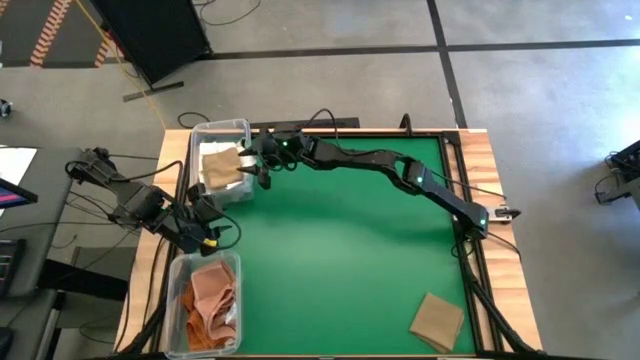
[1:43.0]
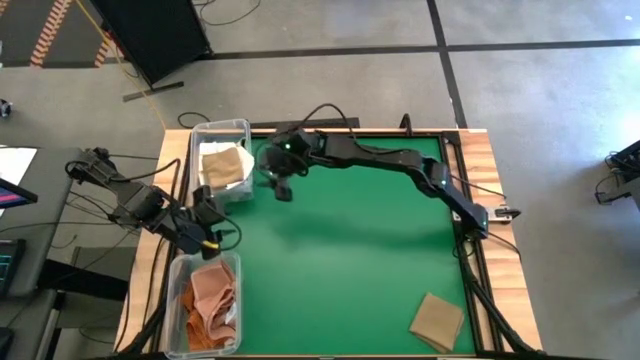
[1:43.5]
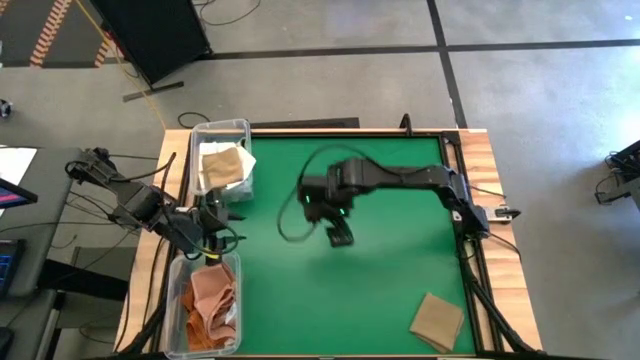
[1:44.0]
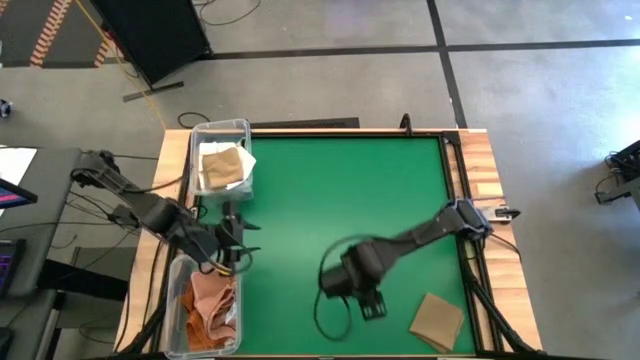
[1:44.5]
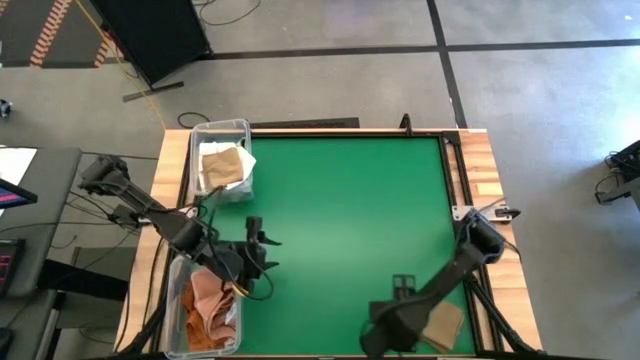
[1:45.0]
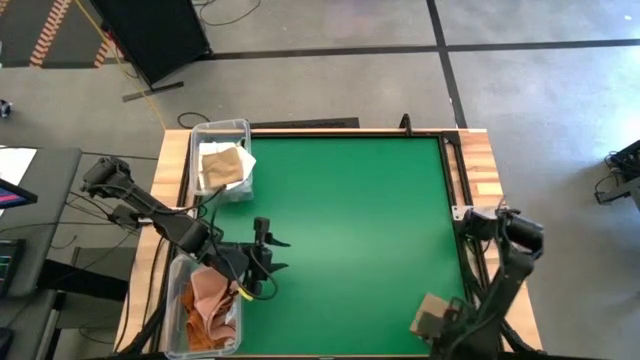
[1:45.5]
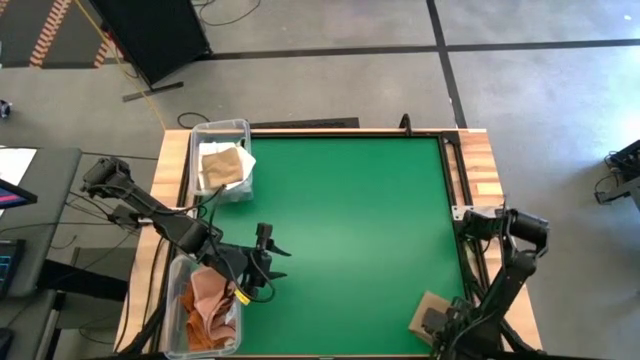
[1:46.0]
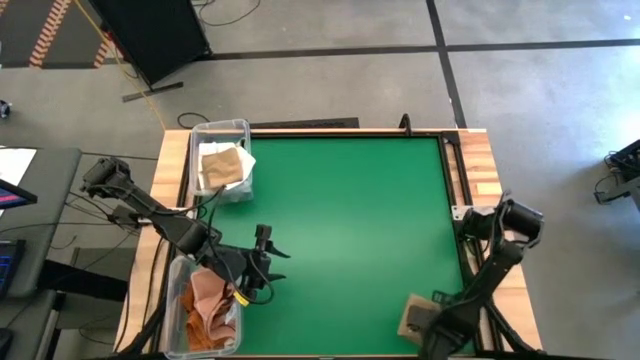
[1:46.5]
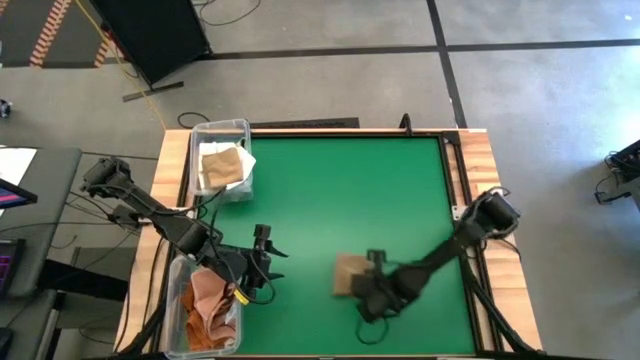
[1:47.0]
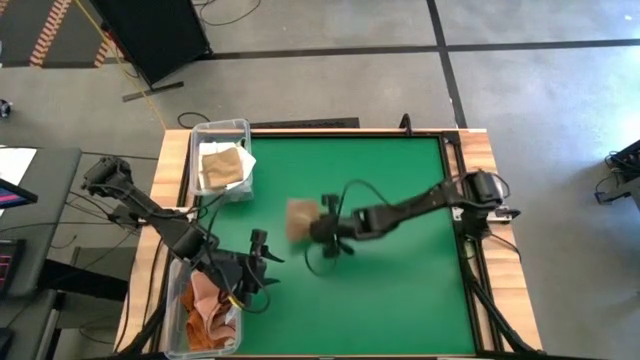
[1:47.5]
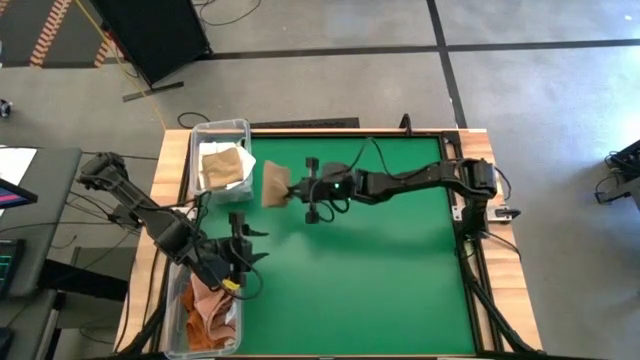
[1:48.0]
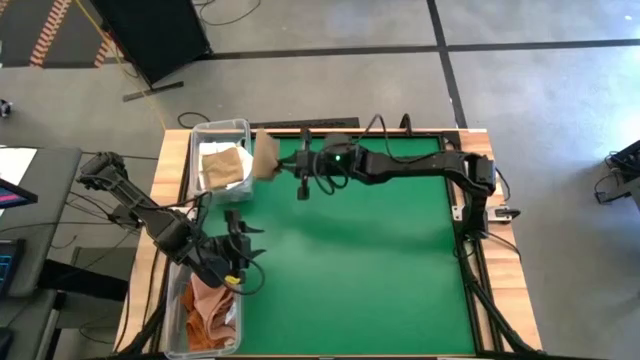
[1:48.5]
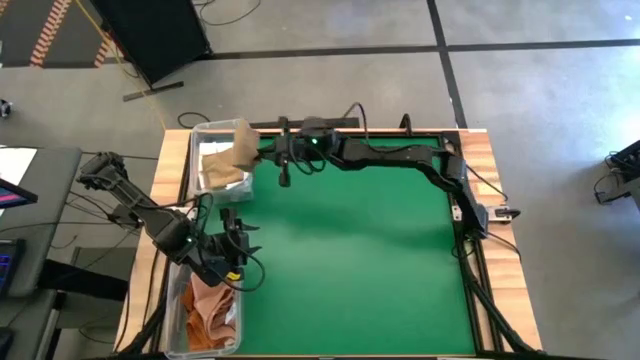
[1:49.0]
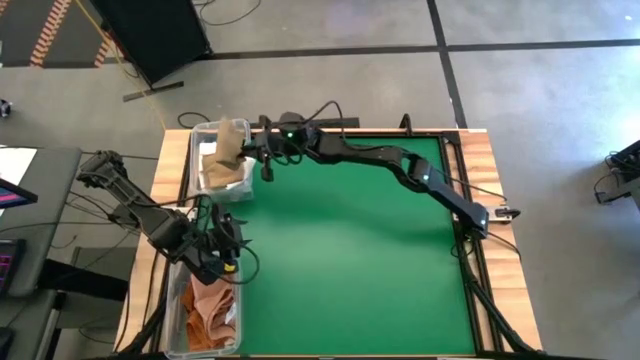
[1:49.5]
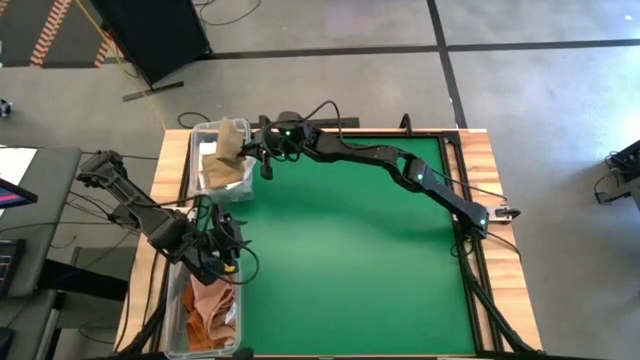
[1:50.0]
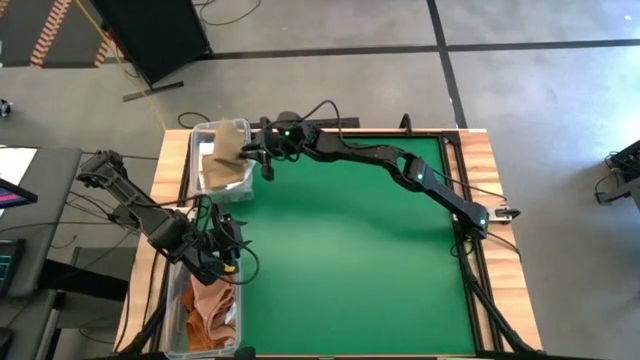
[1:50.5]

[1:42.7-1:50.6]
Task: Sort towels by color in basket
Put the brown towel into the top left transparent bin

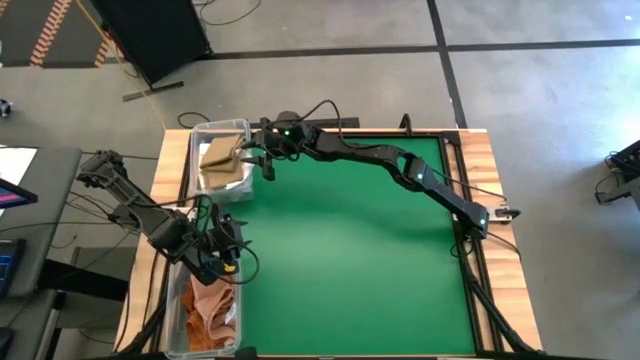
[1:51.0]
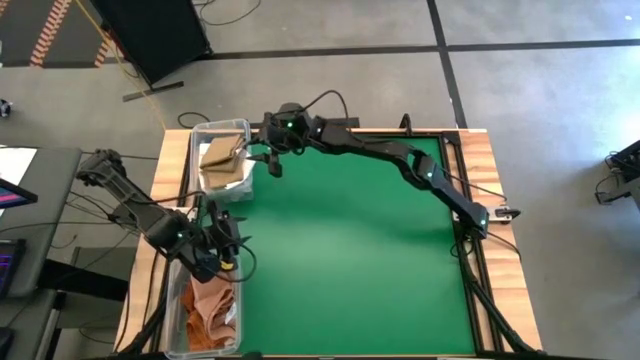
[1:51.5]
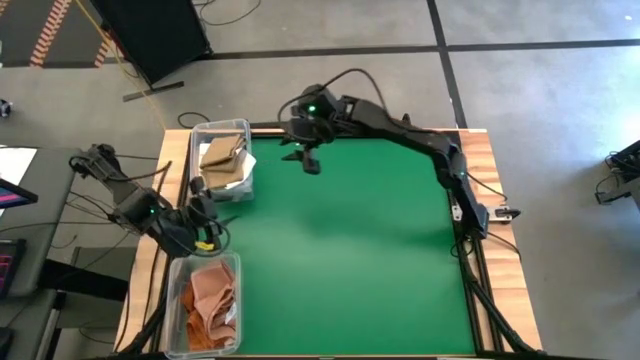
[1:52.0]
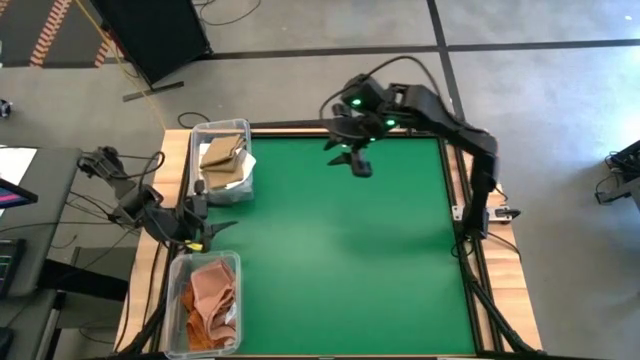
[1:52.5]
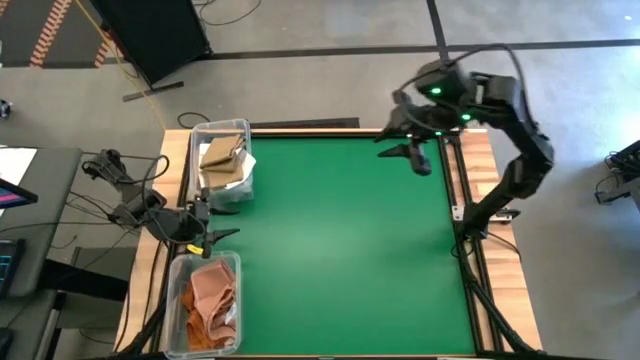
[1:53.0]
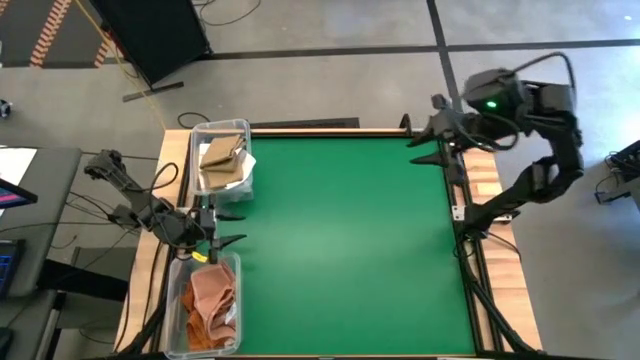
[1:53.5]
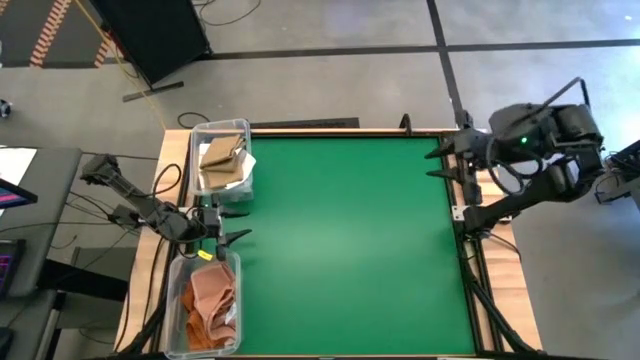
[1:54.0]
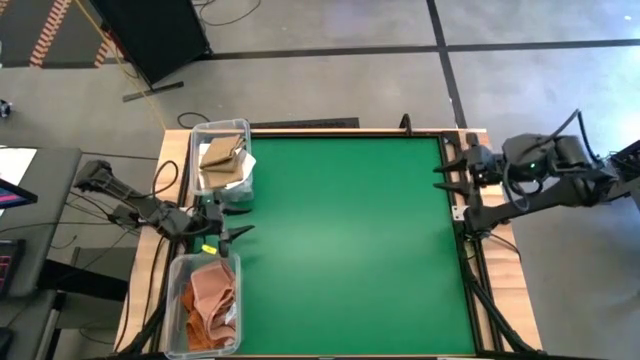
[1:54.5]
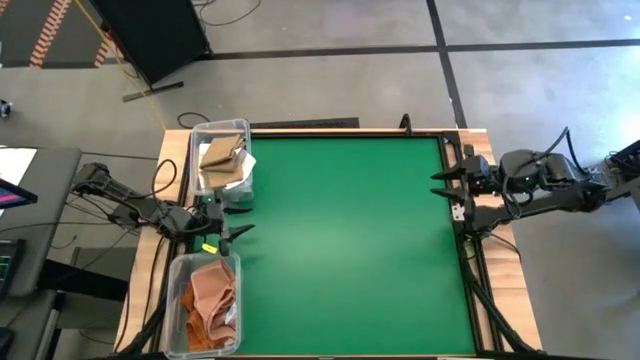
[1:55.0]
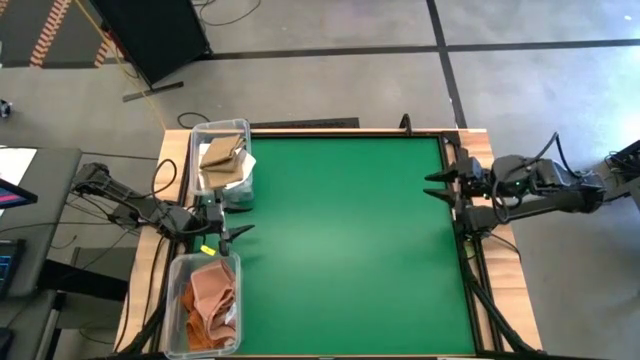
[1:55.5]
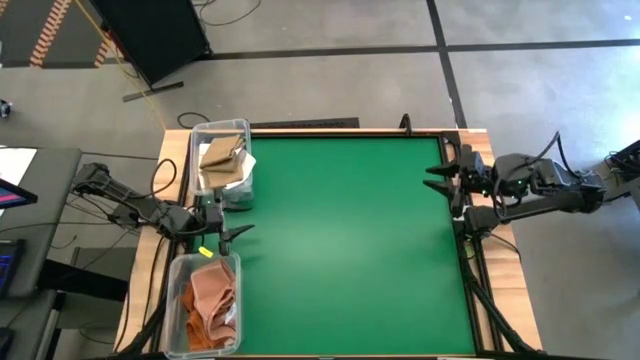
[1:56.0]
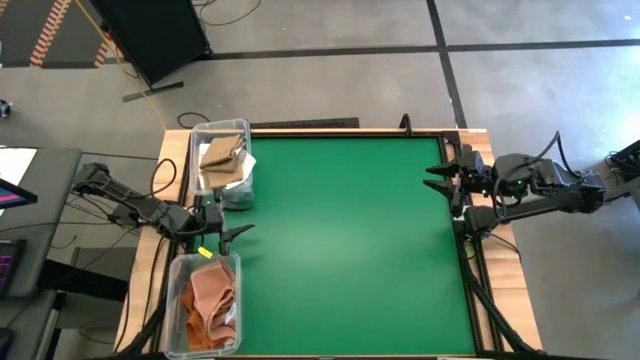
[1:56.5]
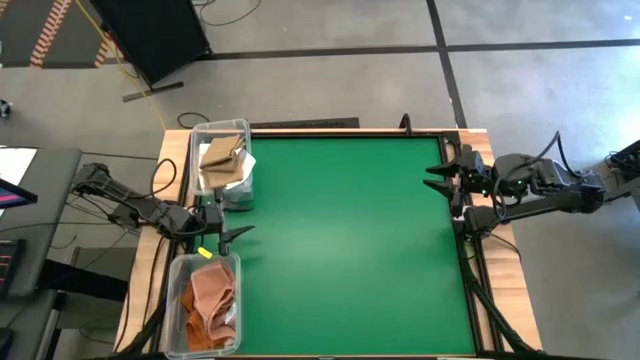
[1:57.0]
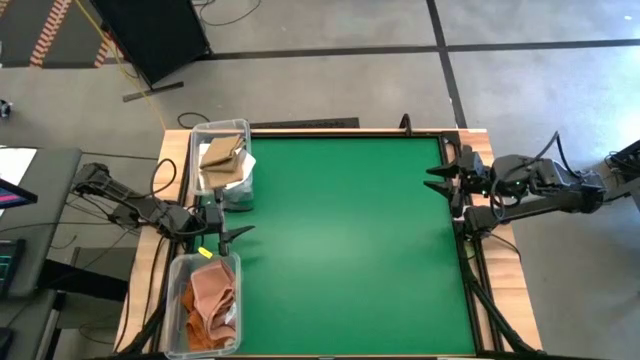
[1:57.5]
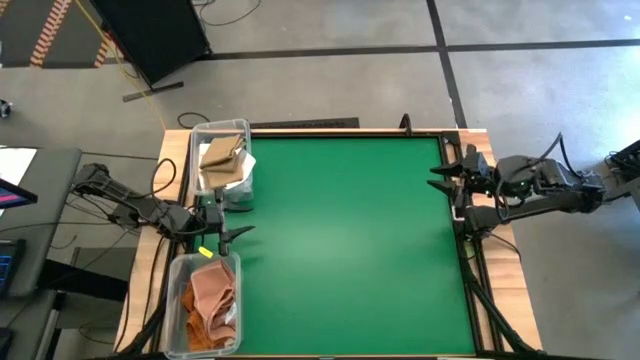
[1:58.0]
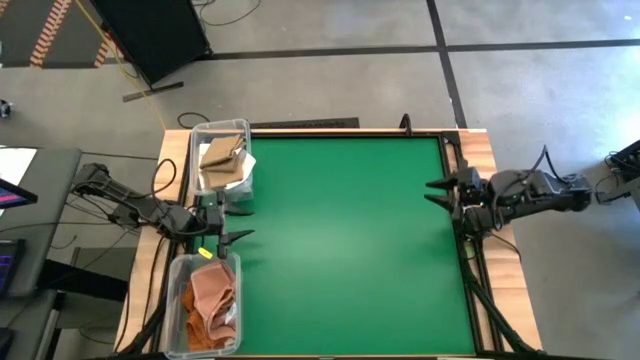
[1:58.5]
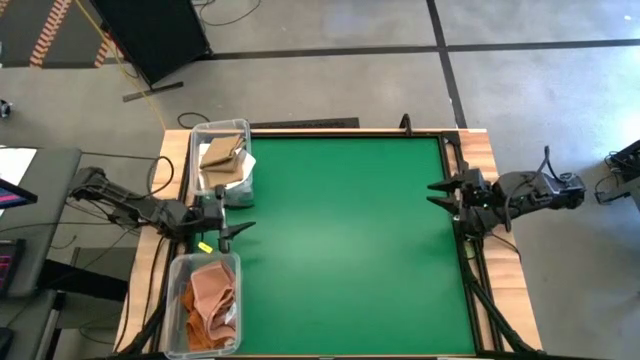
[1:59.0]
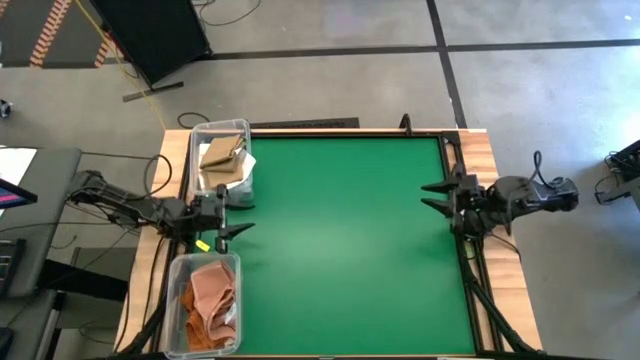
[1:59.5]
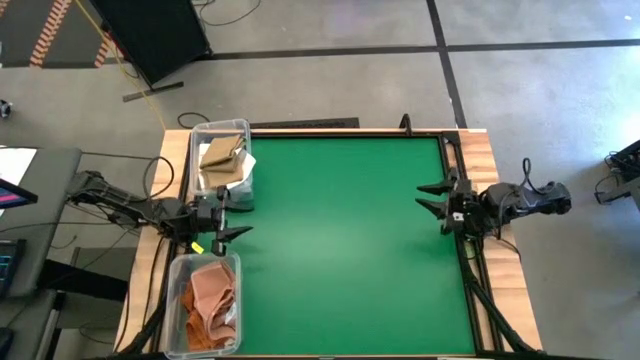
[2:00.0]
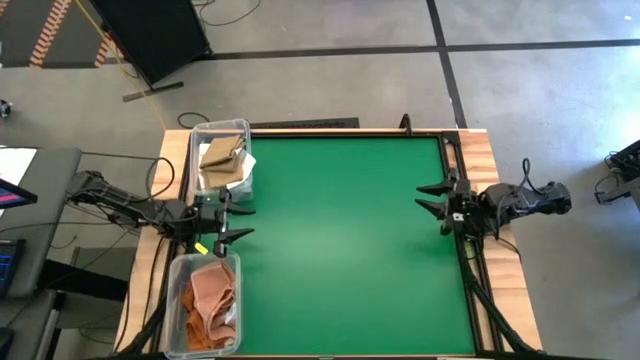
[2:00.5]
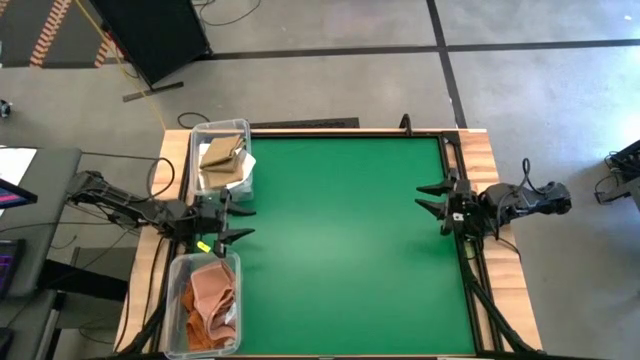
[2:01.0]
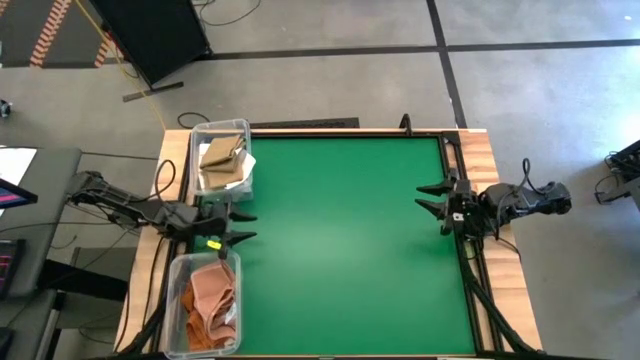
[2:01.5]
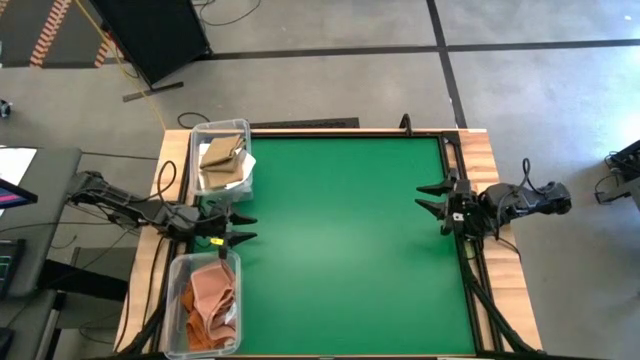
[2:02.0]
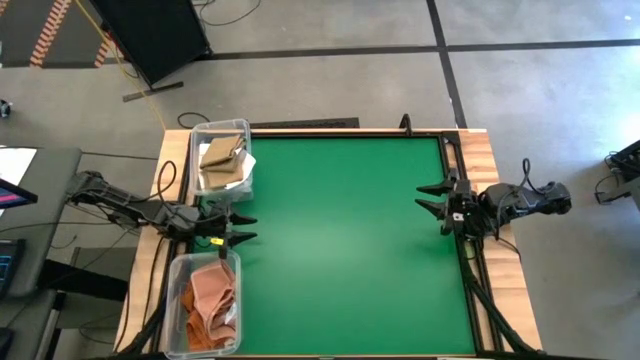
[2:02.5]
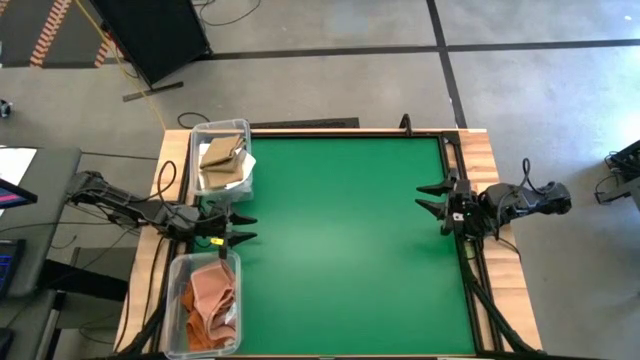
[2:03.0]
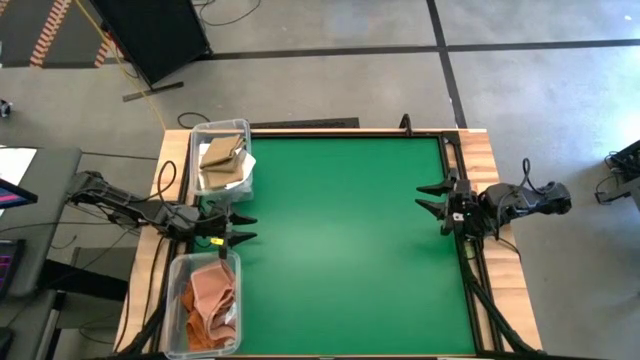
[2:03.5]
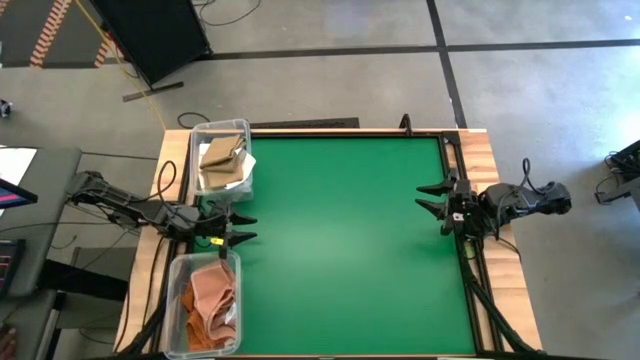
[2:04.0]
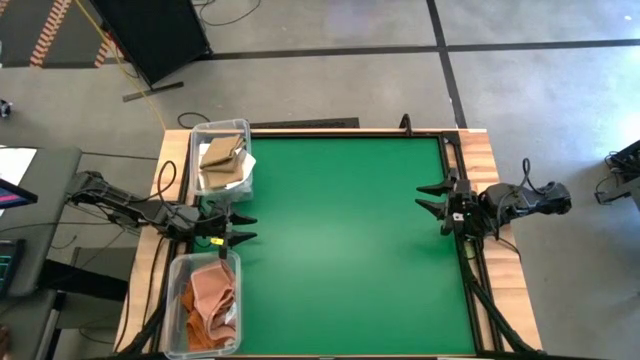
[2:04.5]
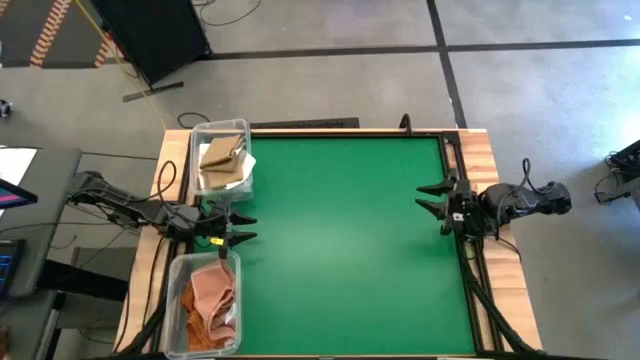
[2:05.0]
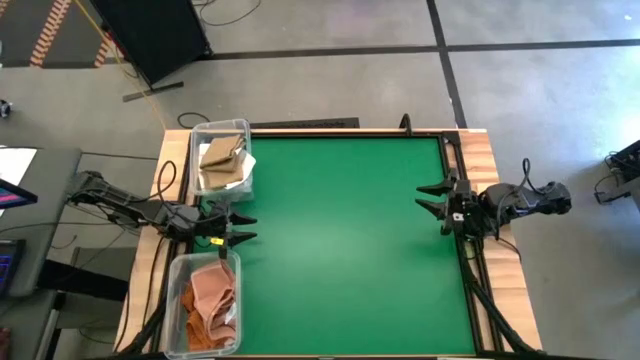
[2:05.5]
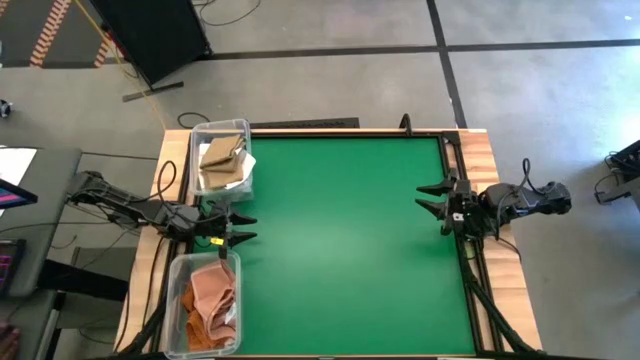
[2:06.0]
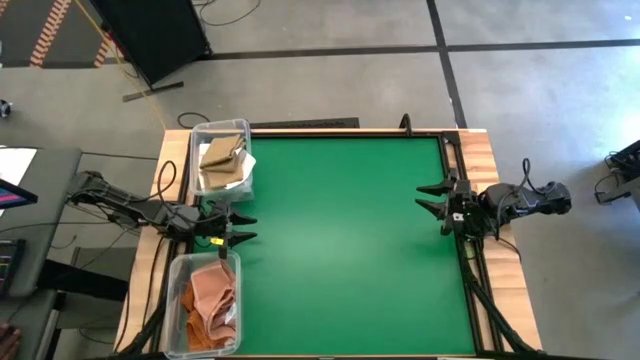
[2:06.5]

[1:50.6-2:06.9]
Return to Home Position
